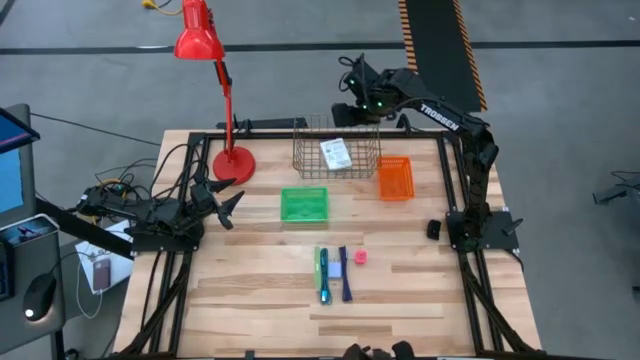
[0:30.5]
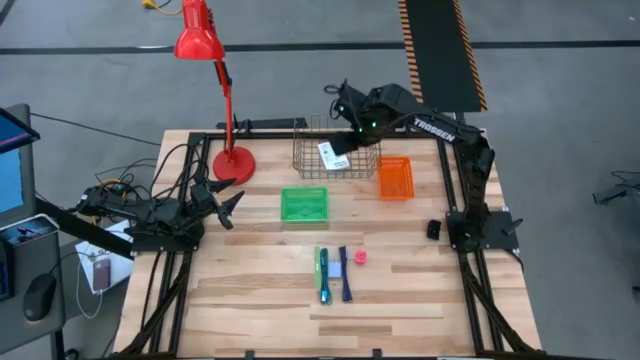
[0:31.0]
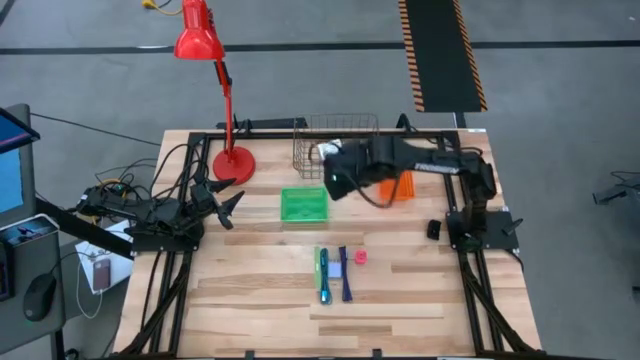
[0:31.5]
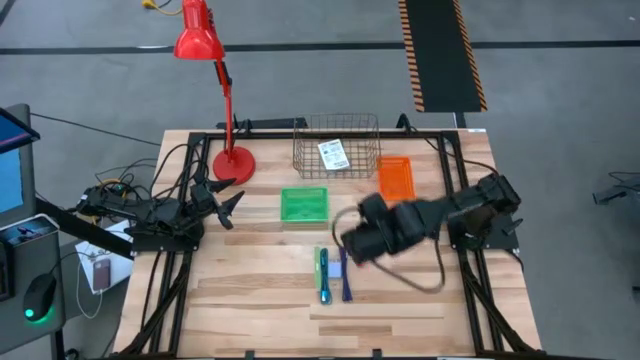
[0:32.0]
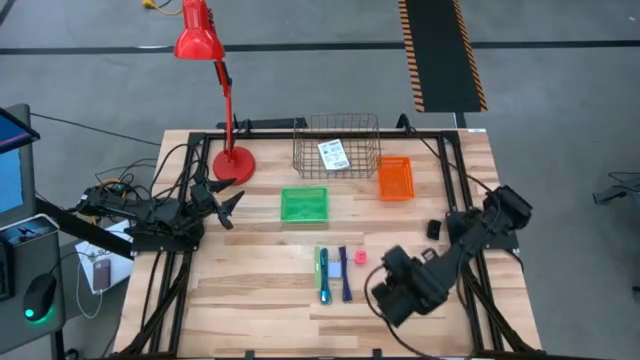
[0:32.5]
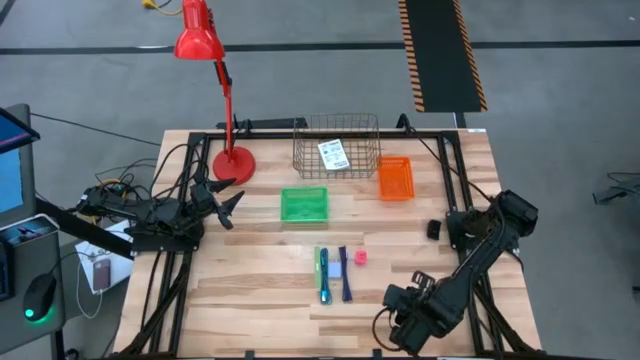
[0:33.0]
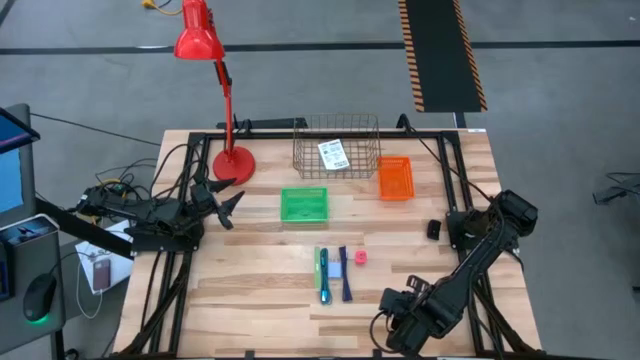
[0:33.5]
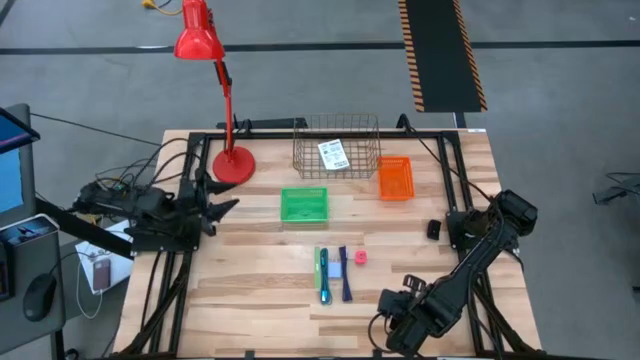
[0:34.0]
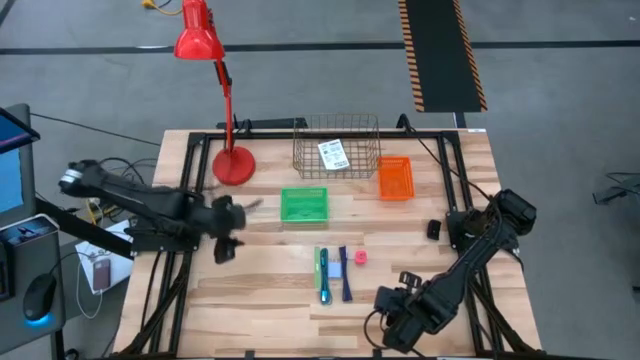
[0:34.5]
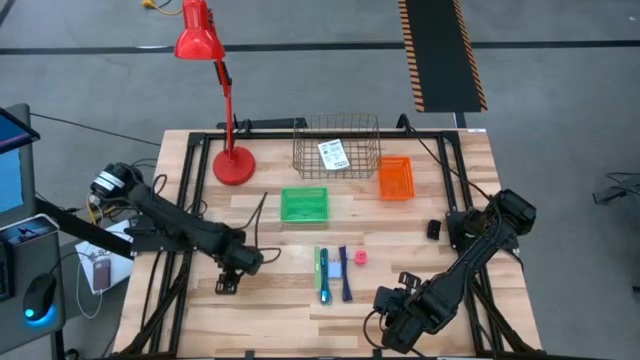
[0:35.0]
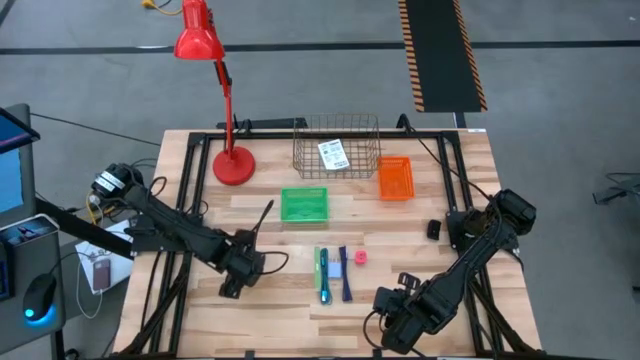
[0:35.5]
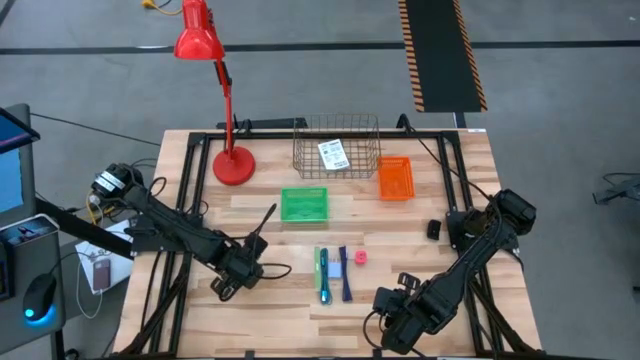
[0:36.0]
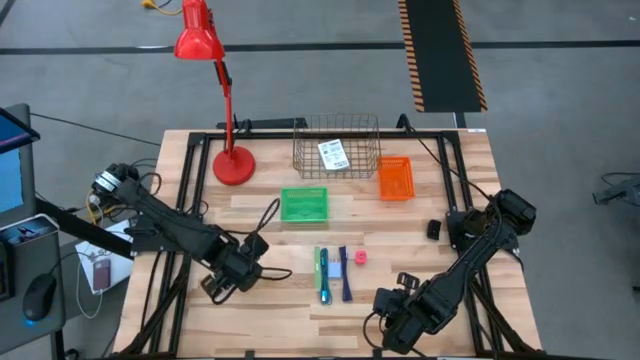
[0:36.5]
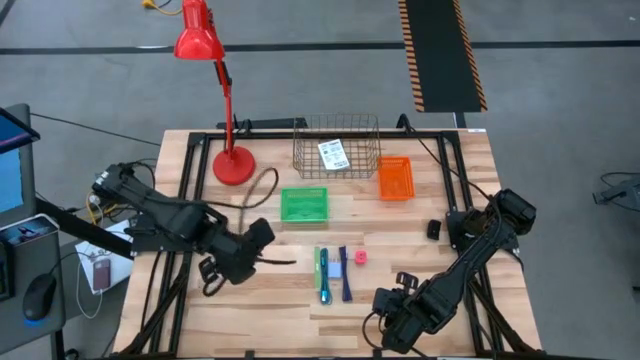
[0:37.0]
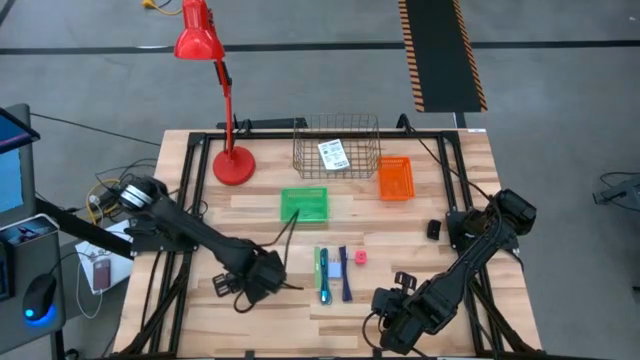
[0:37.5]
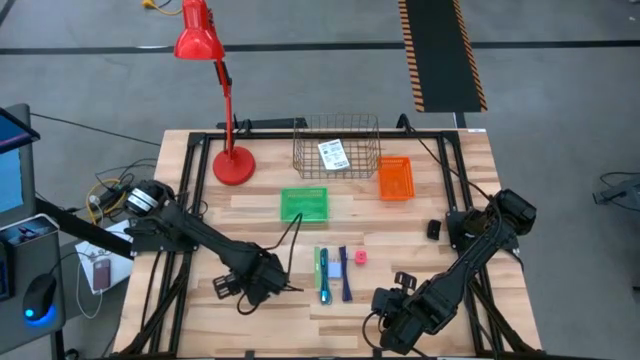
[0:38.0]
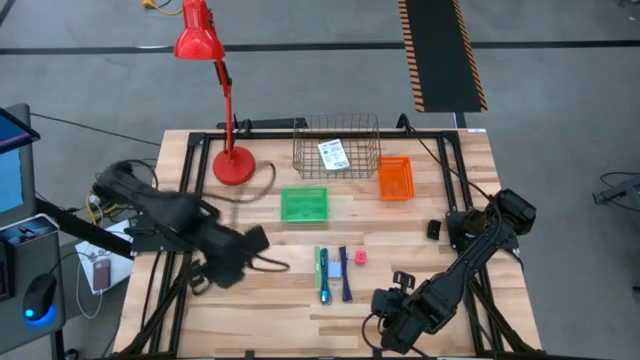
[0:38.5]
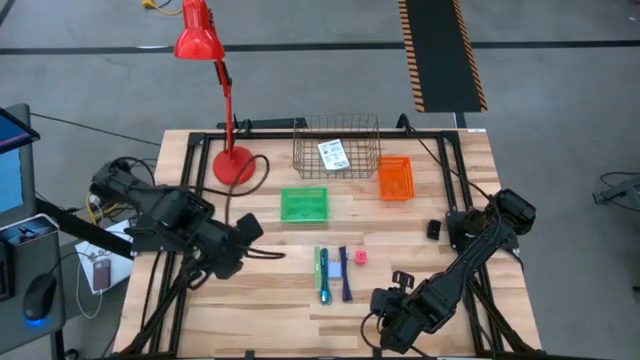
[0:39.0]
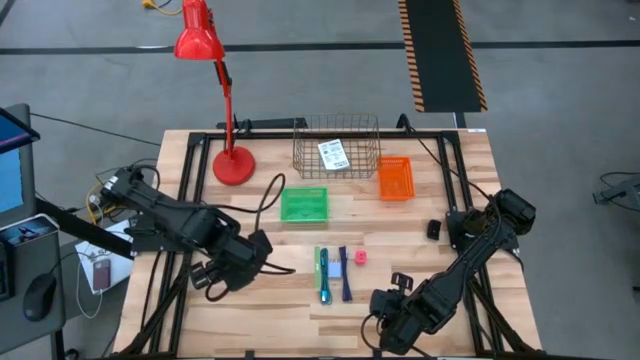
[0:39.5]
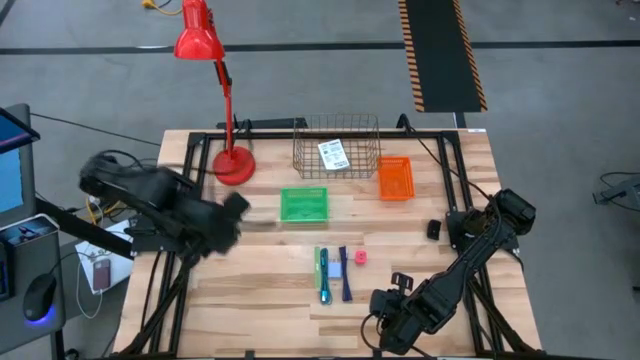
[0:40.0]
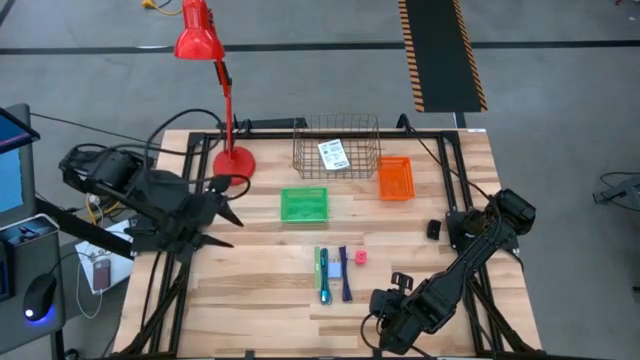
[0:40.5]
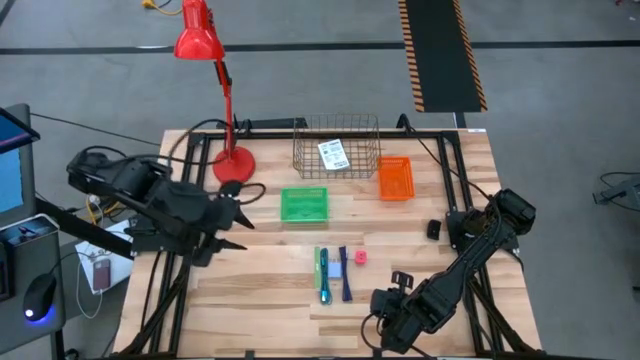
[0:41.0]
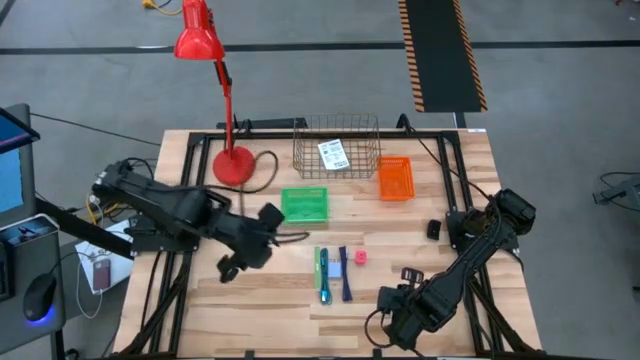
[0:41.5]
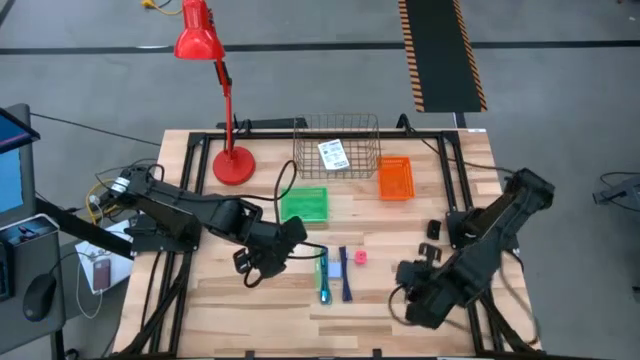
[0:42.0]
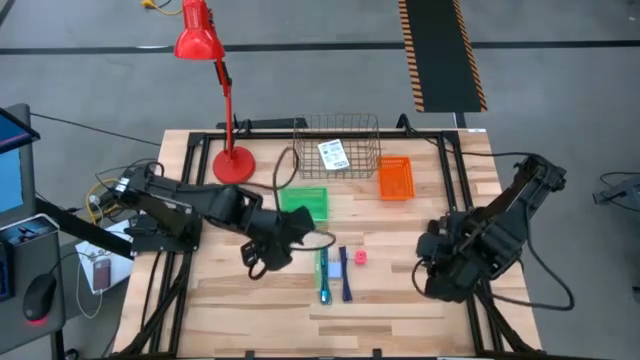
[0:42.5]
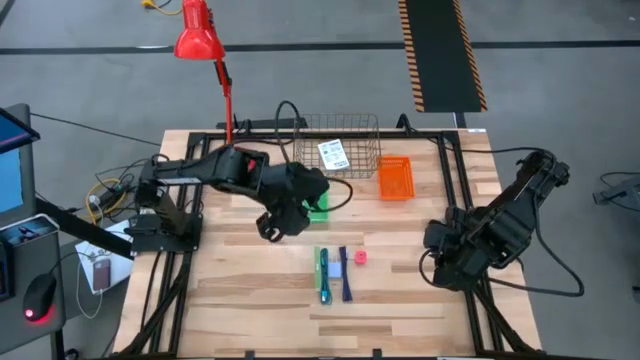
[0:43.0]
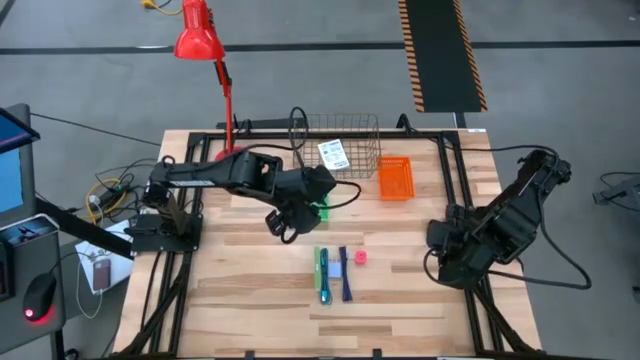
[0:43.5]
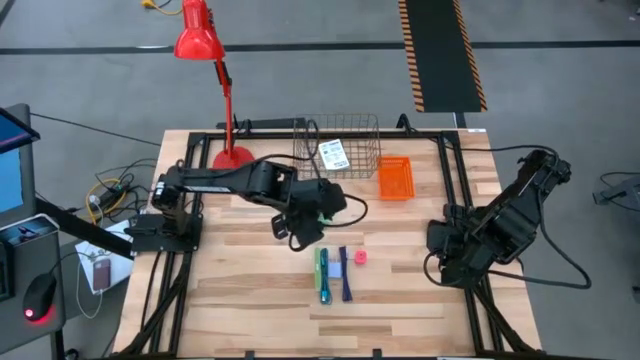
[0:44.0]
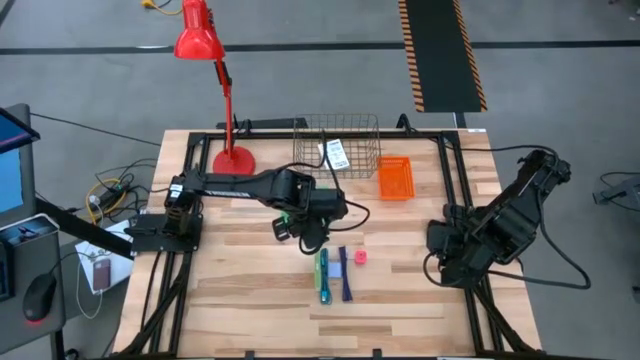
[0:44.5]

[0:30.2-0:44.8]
Task: Pick and place items into bin
Put the white card reader box into the gold wire basket

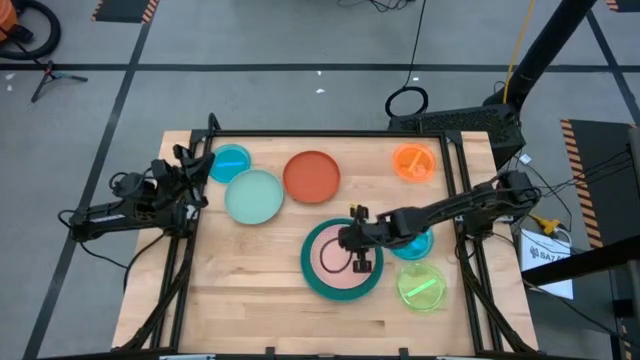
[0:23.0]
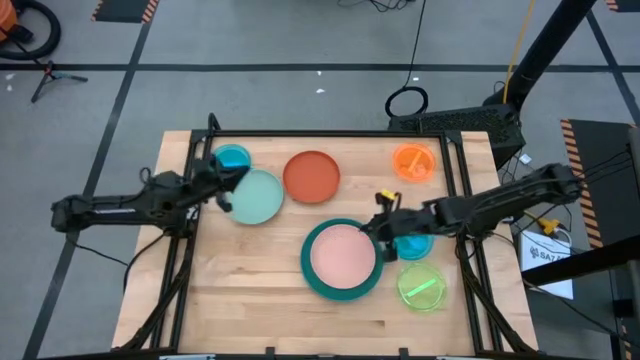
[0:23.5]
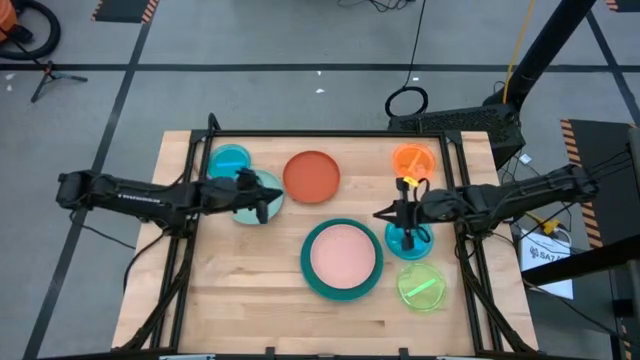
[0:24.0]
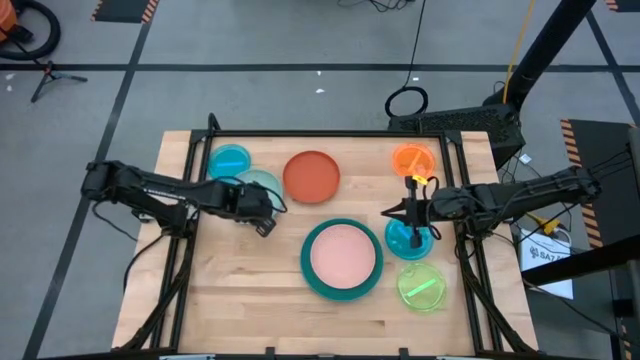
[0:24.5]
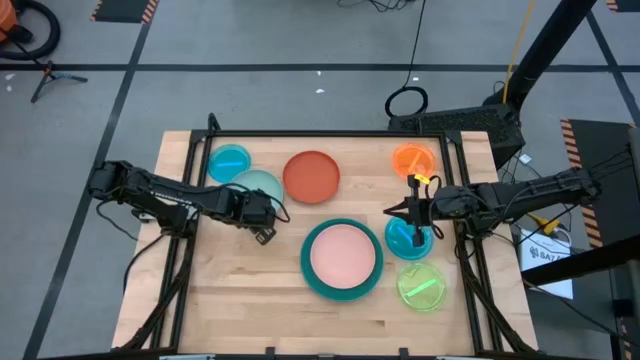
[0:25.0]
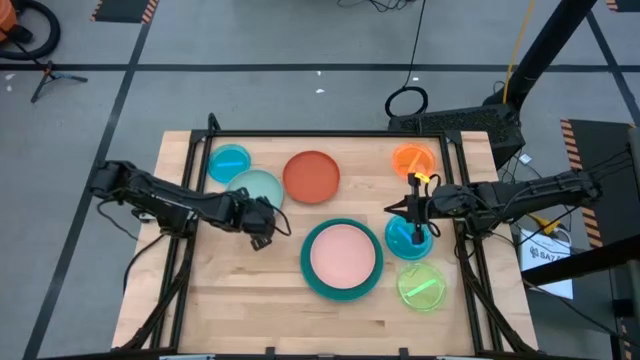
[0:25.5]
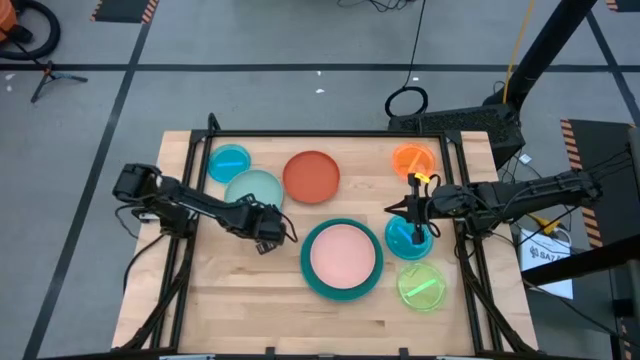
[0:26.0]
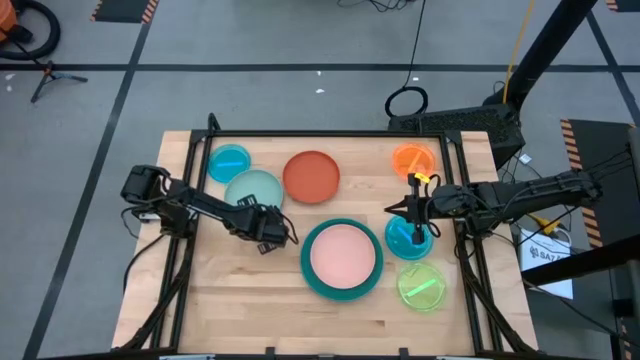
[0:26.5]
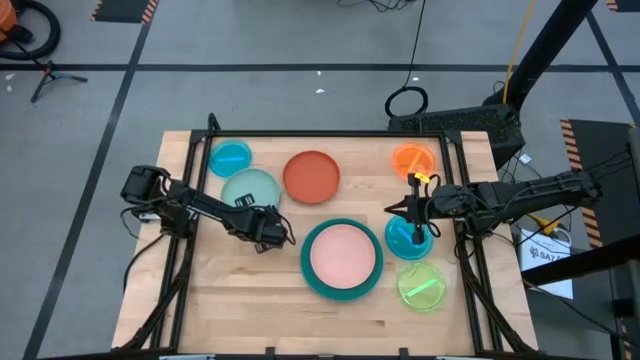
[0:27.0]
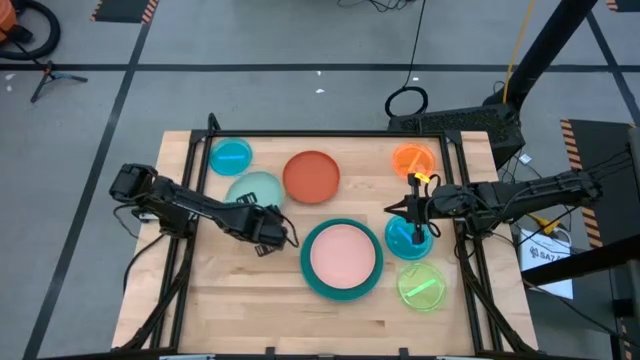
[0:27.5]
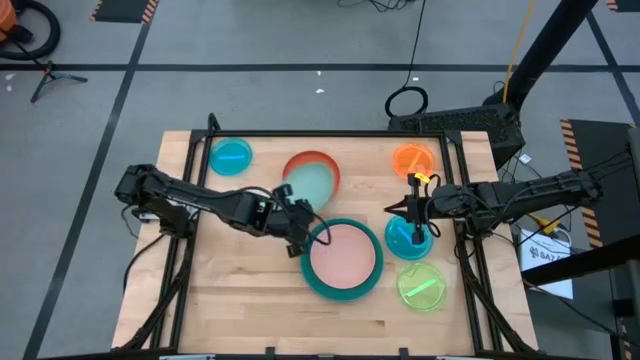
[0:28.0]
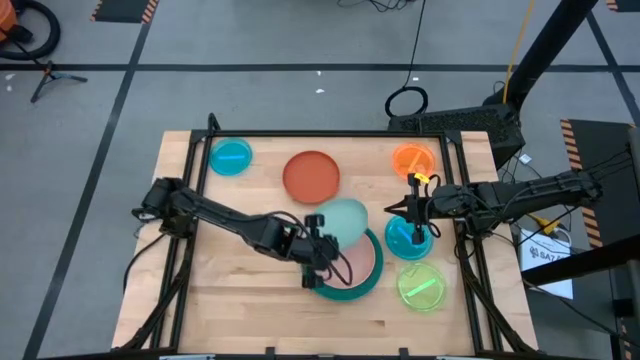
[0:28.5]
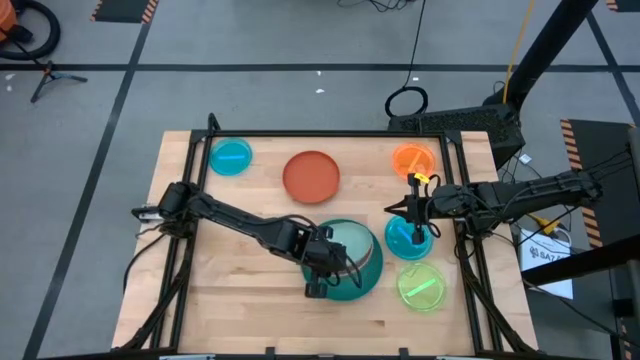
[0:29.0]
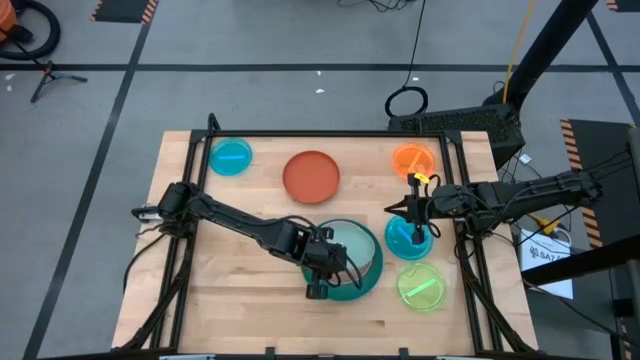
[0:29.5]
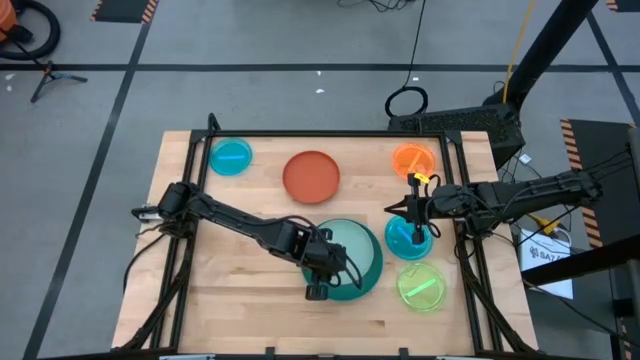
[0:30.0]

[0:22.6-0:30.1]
Task: Stack plastic plates
Stack the light green plate on the light pink plate
